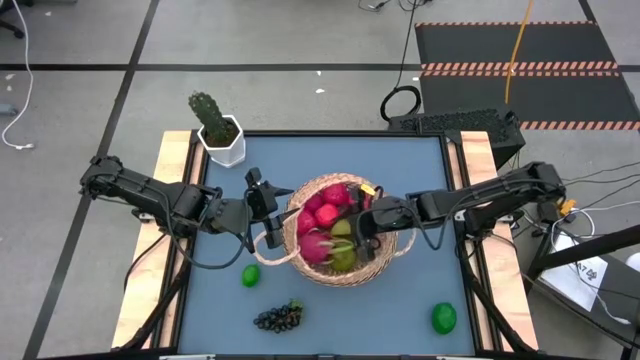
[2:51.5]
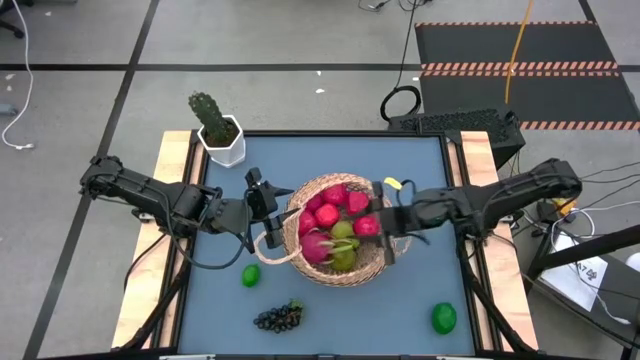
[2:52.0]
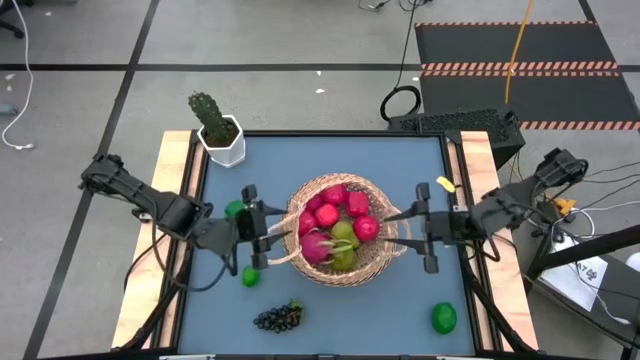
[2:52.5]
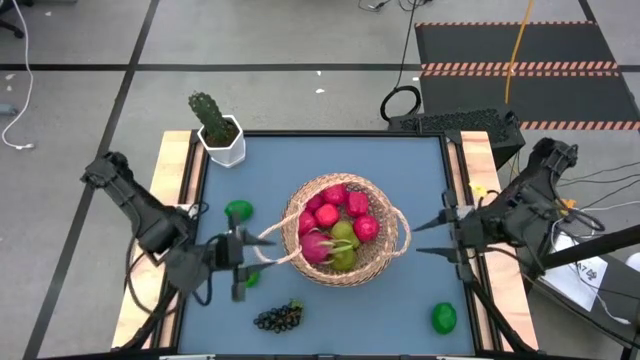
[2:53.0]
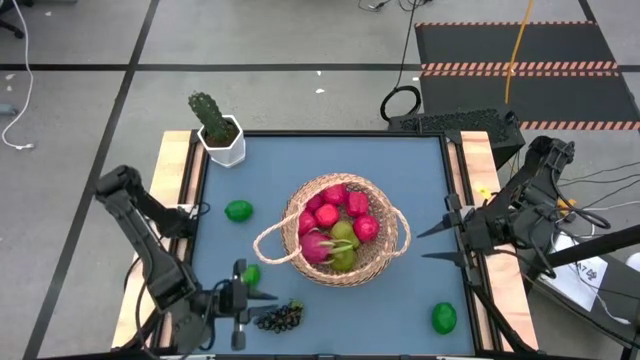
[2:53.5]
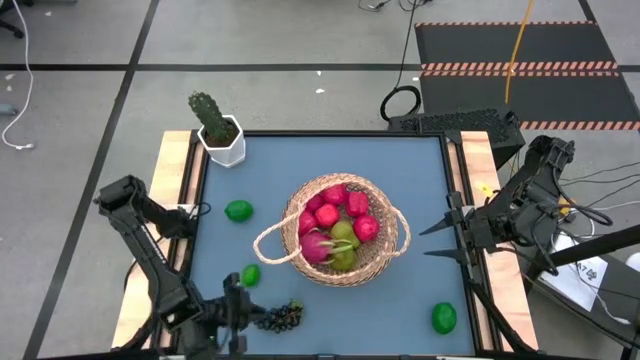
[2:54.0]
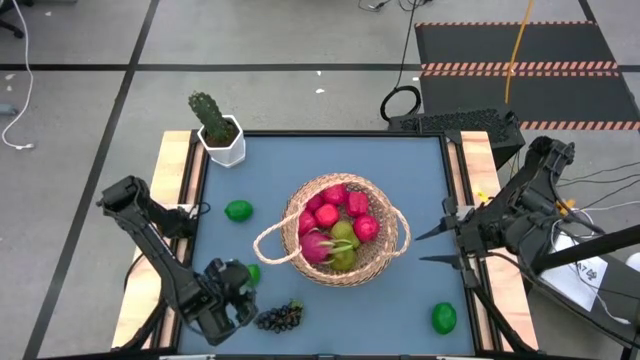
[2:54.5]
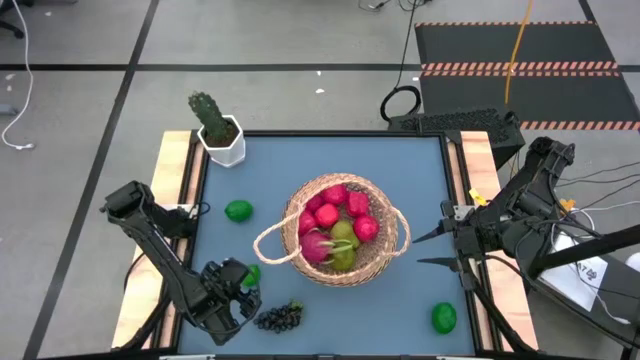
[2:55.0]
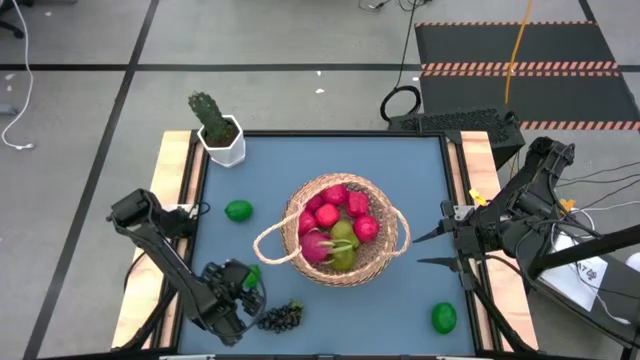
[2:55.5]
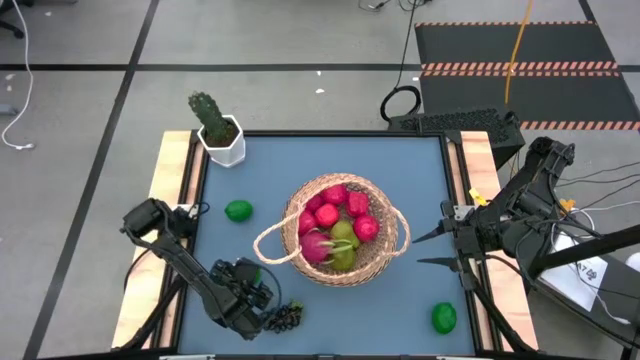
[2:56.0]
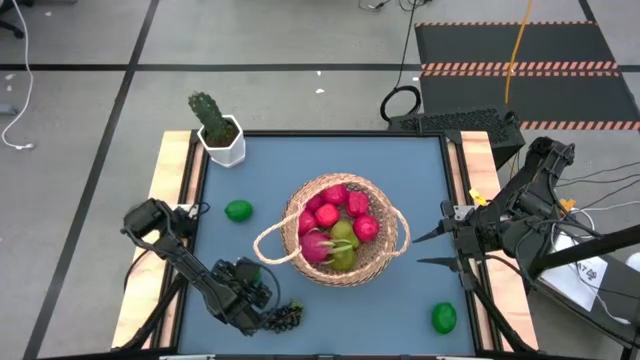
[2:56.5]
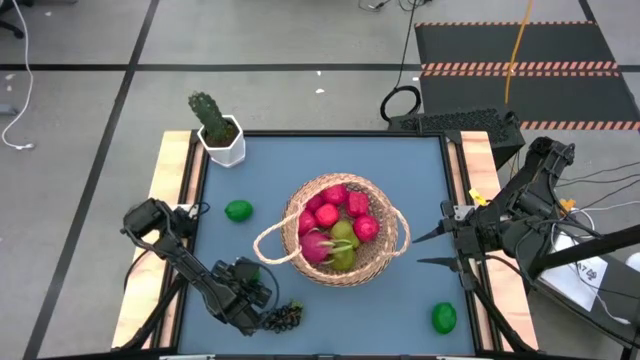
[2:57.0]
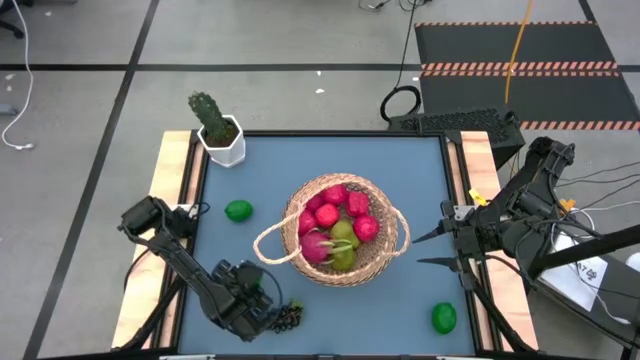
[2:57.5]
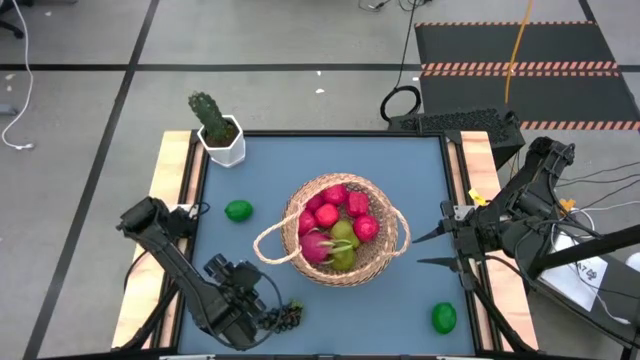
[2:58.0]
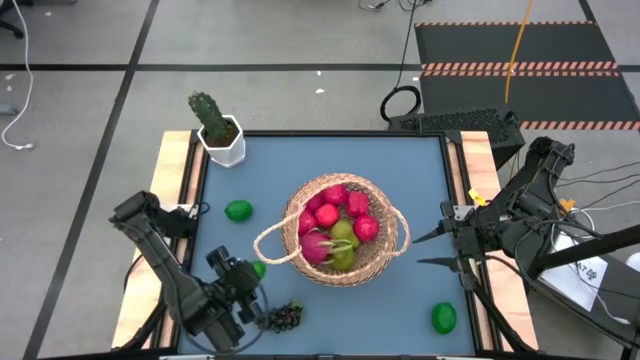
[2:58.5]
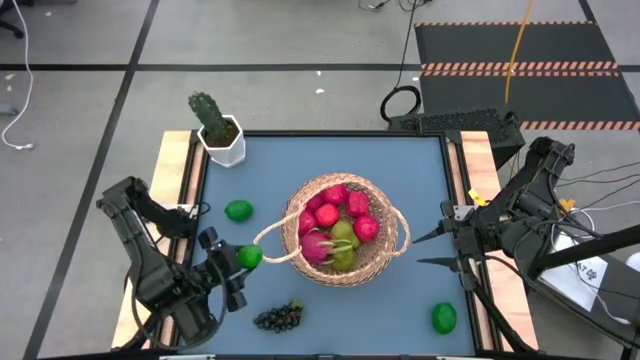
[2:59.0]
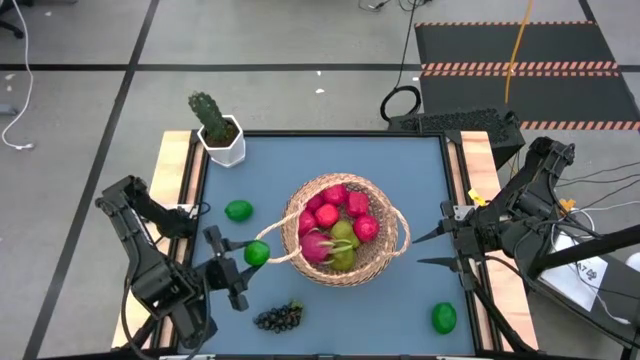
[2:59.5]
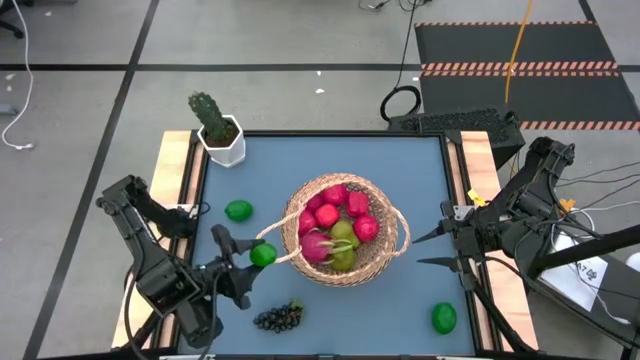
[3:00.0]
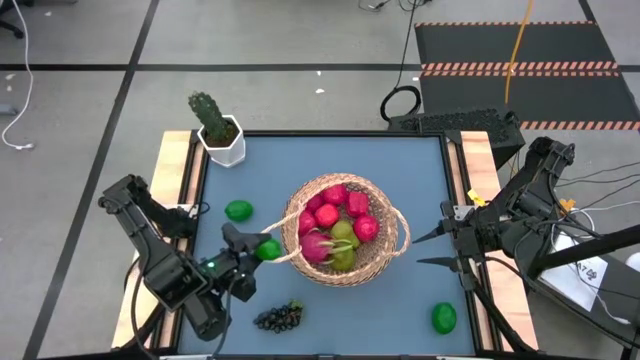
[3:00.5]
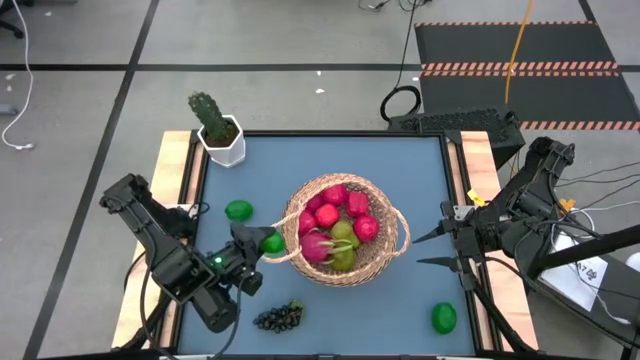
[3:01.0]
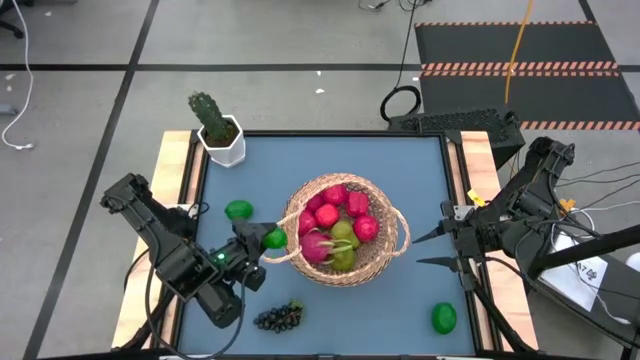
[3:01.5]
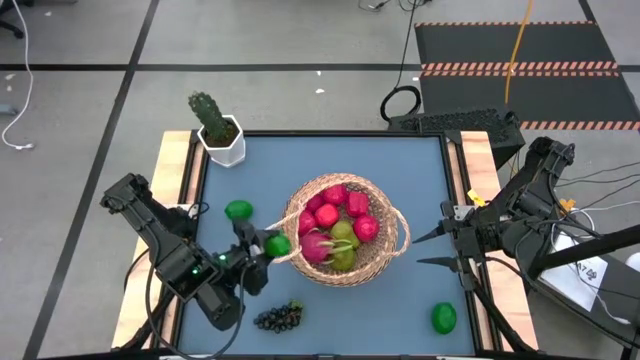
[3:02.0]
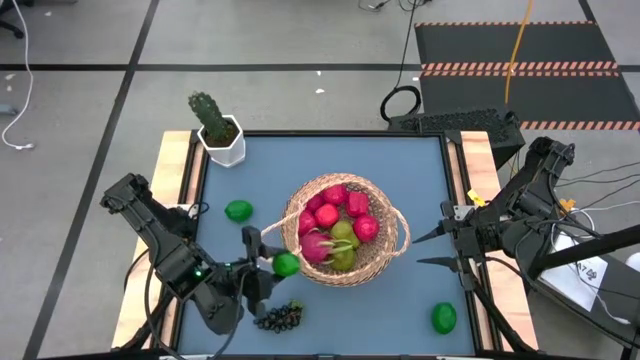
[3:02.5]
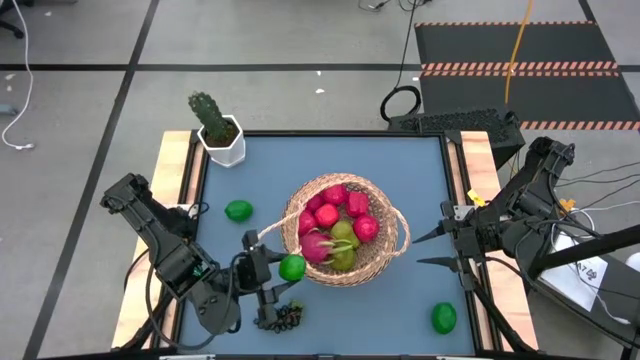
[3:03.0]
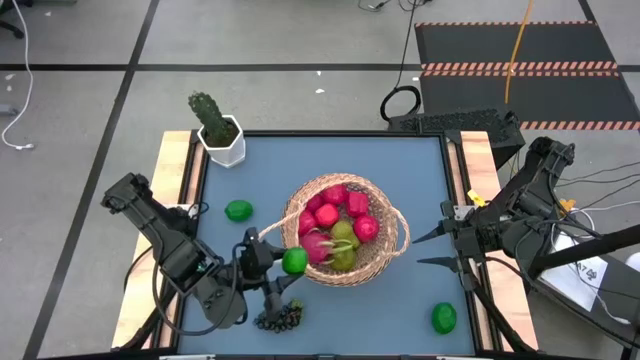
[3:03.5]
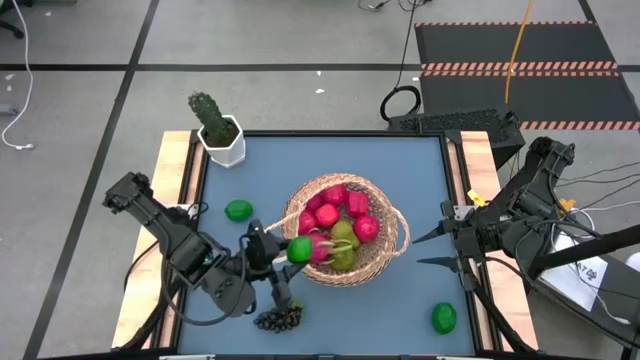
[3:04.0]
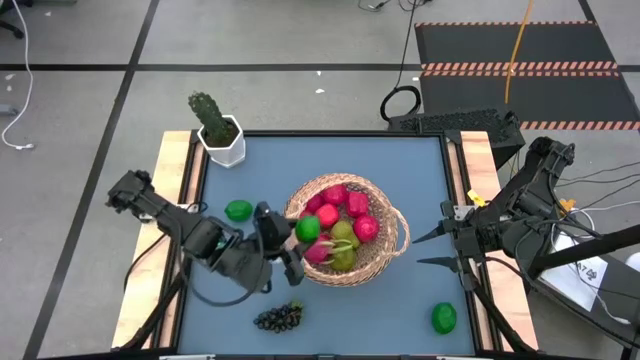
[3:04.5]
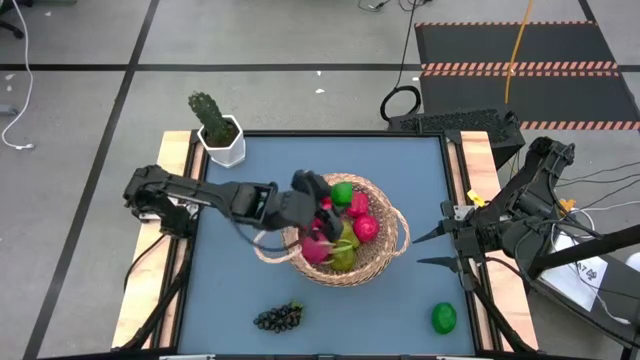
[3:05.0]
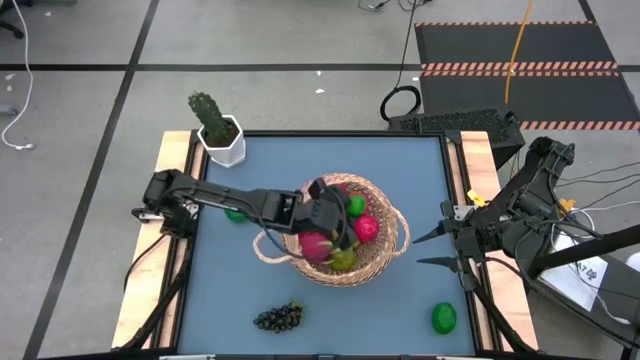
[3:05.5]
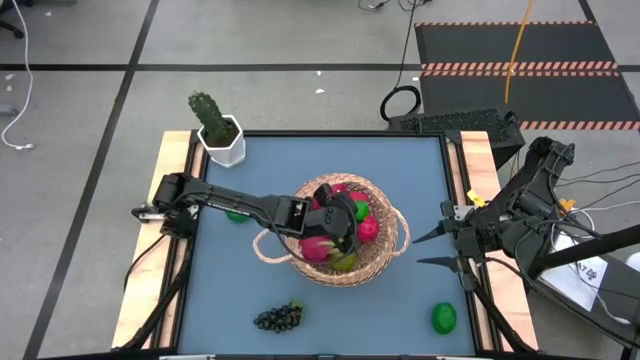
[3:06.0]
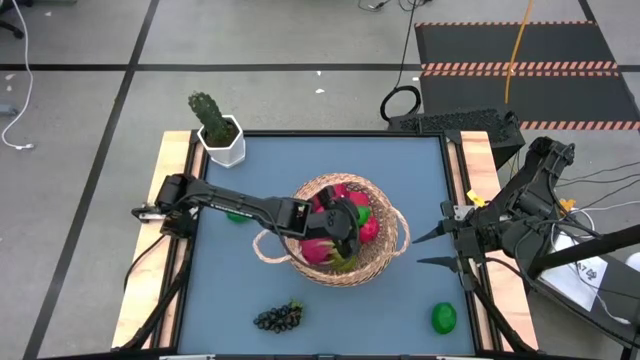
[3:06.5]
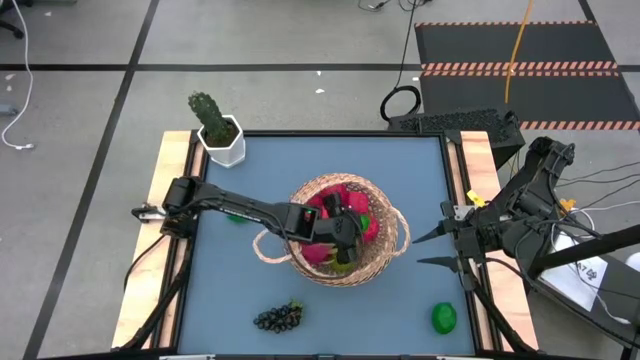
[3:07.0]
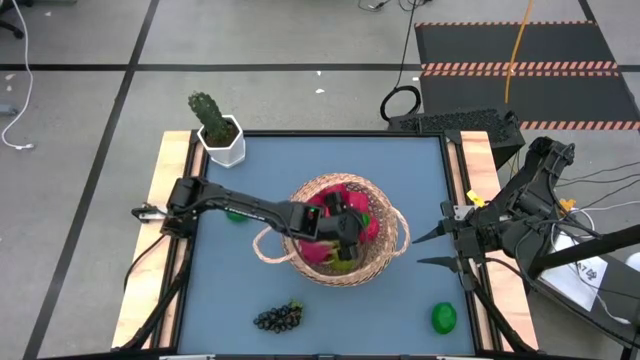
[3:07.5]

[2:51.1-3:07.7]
Task: Build produce basket
Put the middle dark green lime into the brown basket

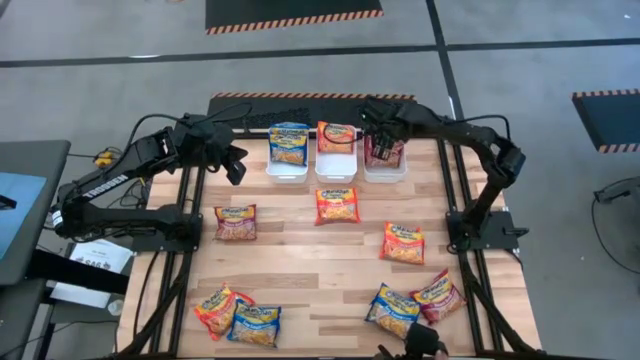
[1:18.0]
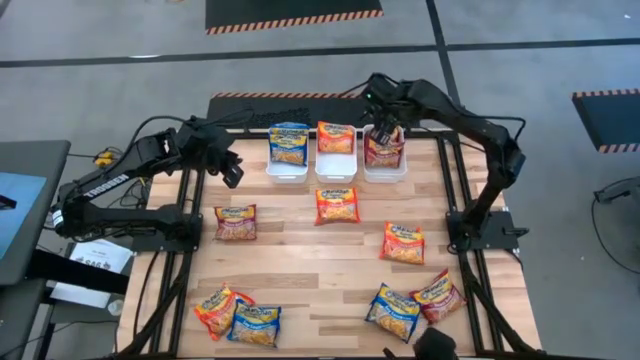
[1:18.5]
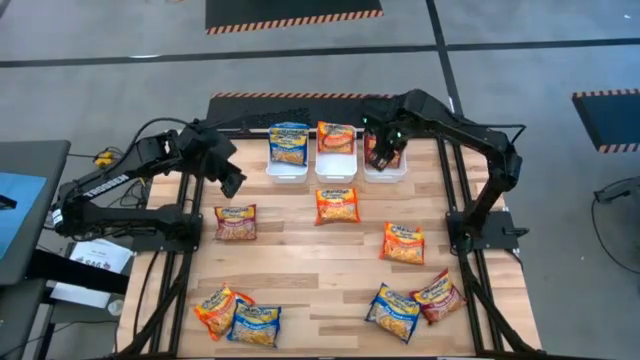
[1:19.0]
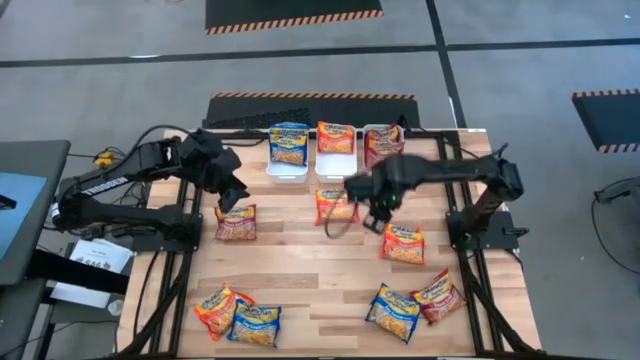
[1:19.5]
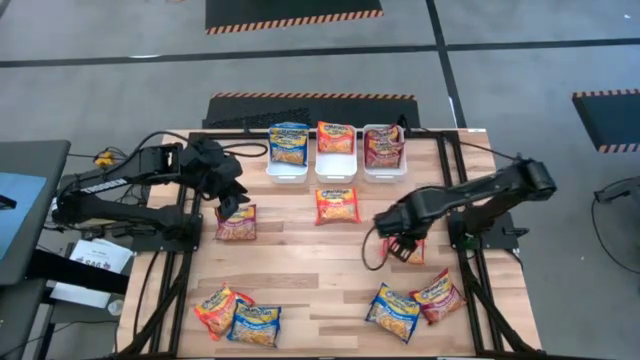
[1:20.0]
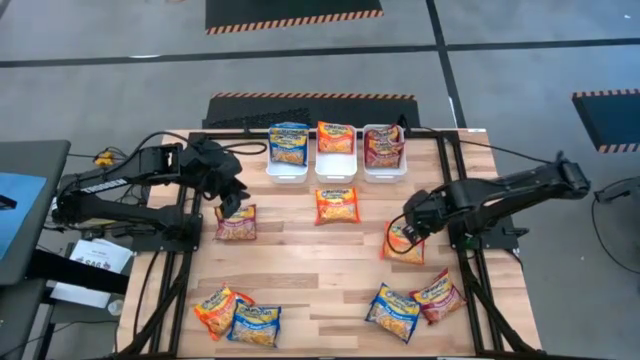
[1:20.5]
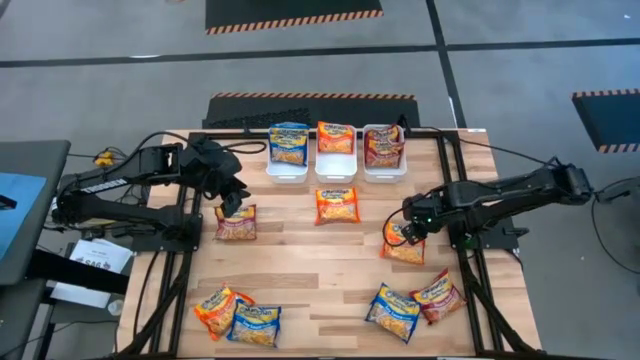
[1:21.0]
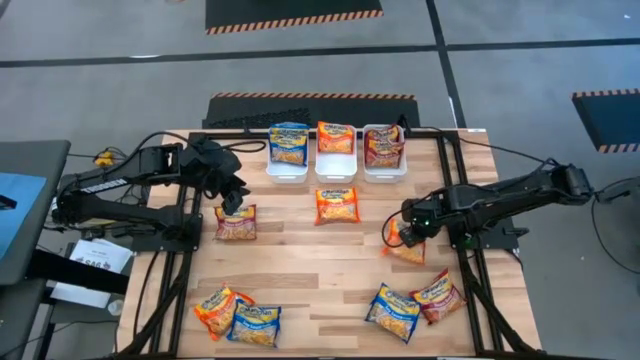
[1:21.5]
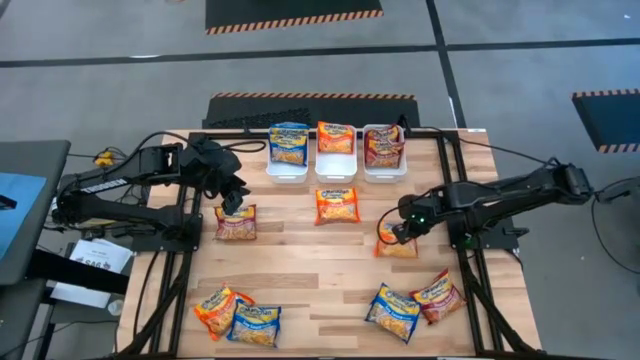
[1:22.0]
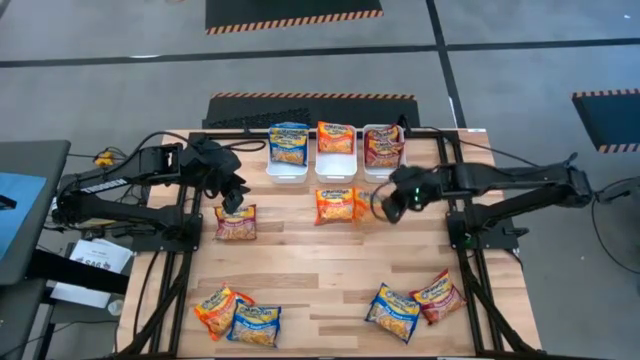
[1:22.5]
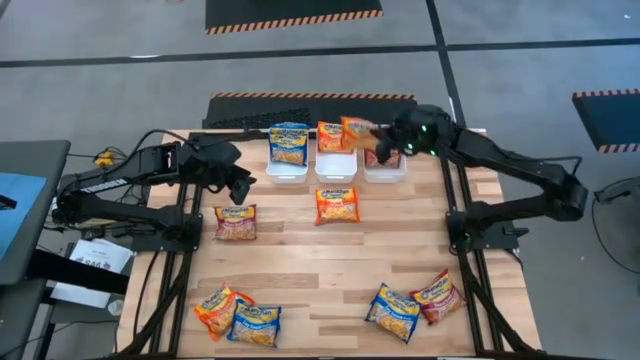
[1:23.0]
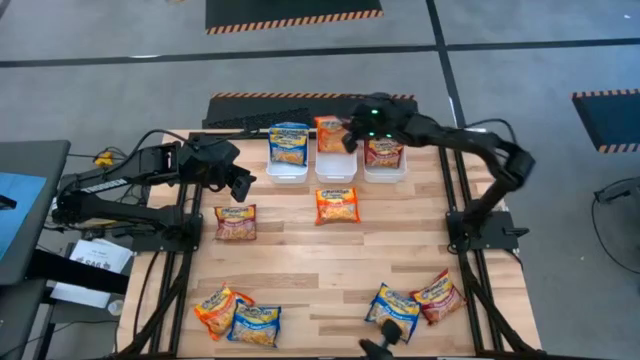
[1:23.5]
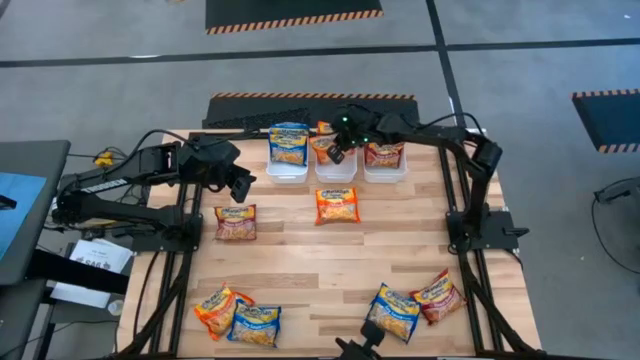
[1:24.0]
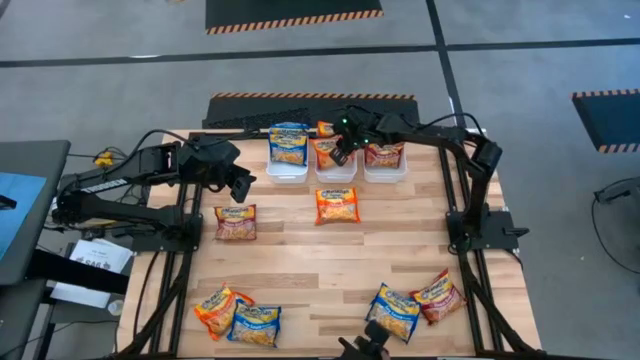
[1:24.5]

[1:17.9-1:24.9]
Task: Sort Maruchan noodles
Put the orange noodle pack into the center white bin
